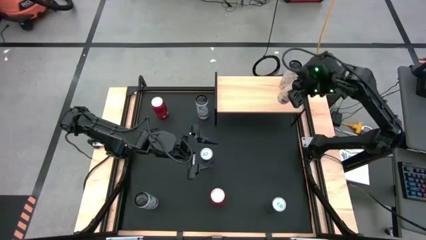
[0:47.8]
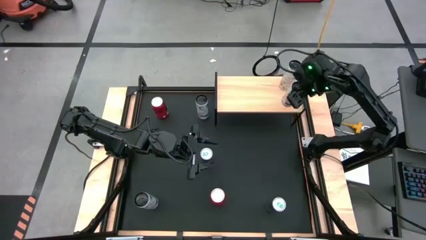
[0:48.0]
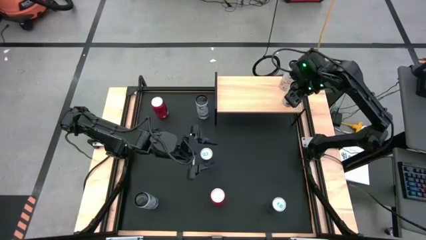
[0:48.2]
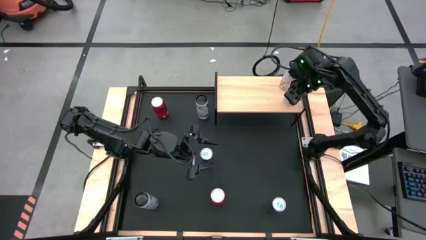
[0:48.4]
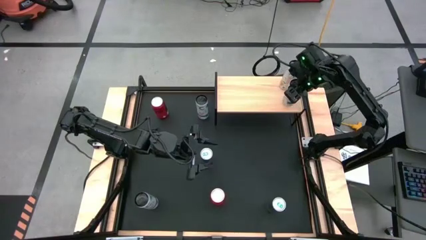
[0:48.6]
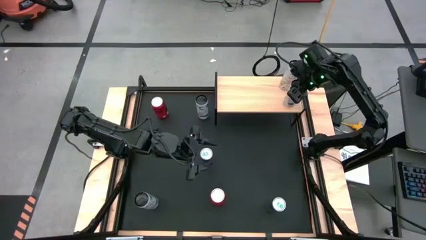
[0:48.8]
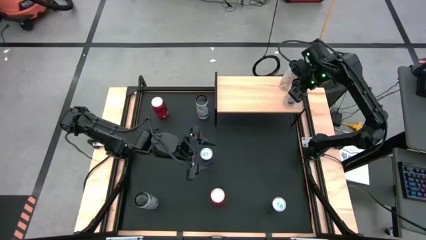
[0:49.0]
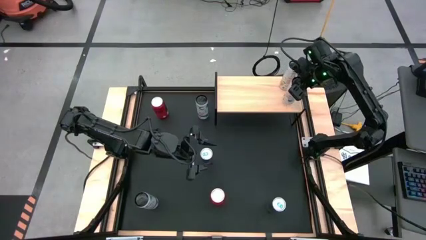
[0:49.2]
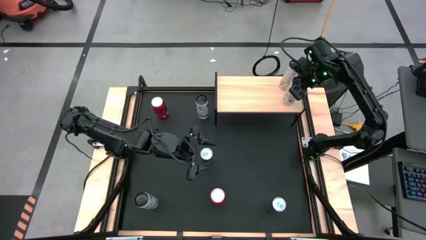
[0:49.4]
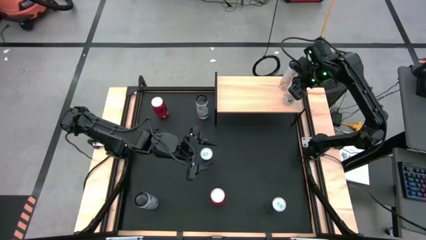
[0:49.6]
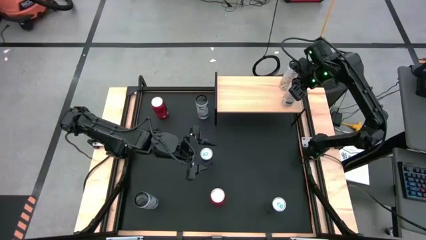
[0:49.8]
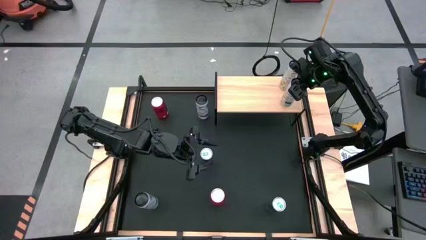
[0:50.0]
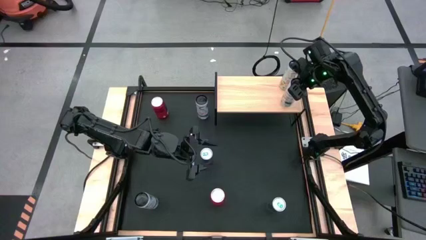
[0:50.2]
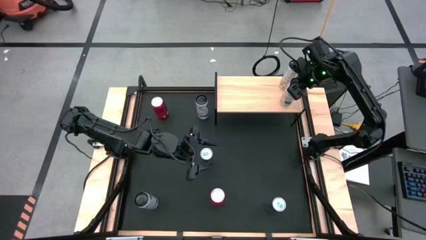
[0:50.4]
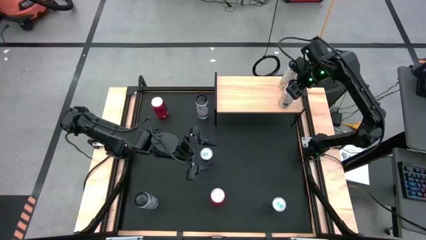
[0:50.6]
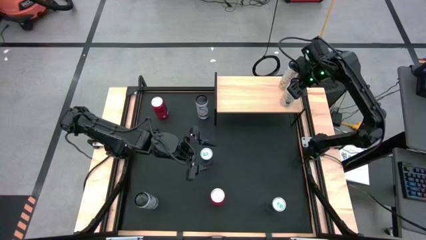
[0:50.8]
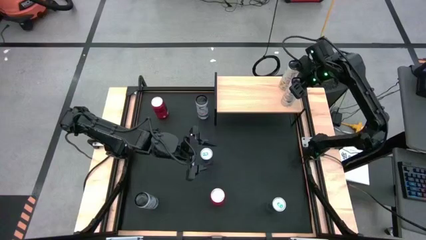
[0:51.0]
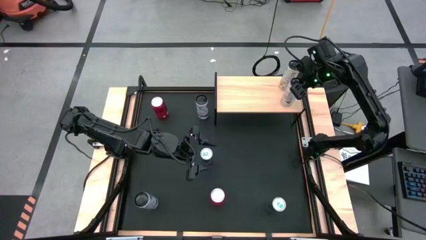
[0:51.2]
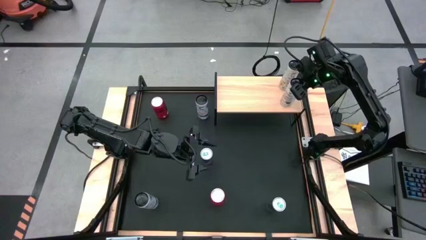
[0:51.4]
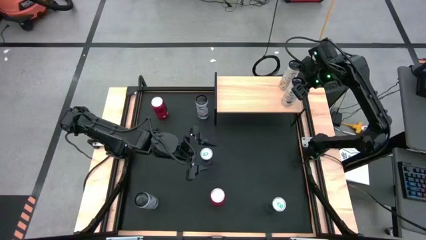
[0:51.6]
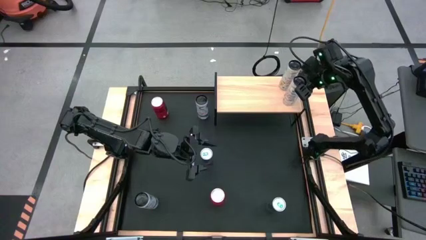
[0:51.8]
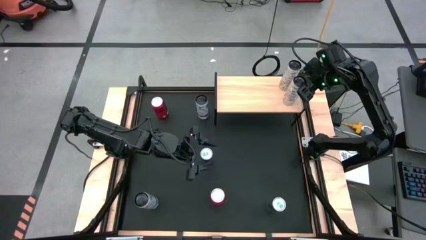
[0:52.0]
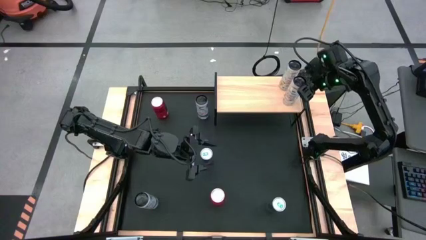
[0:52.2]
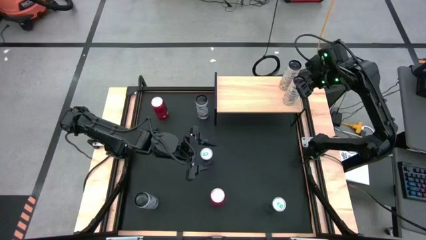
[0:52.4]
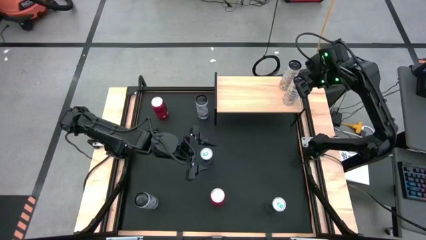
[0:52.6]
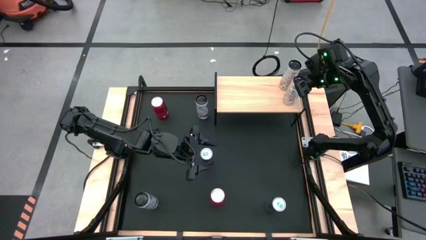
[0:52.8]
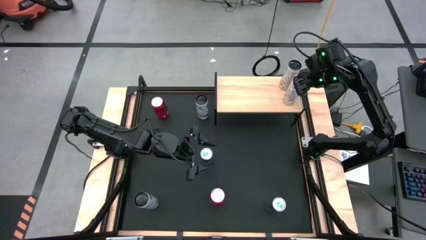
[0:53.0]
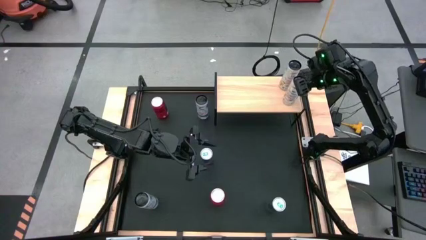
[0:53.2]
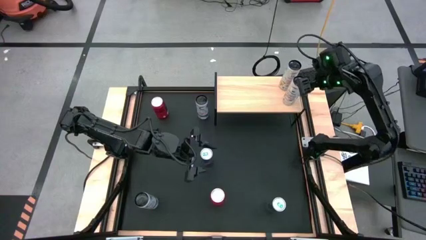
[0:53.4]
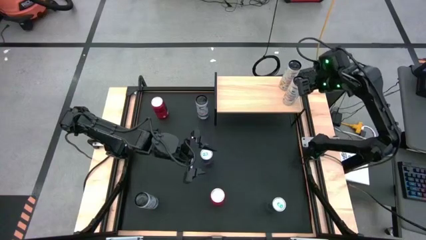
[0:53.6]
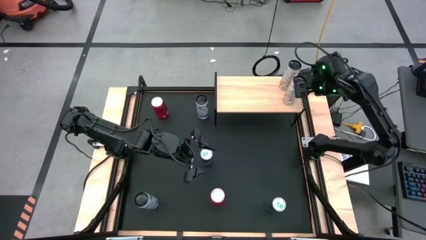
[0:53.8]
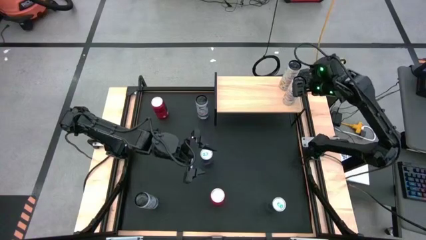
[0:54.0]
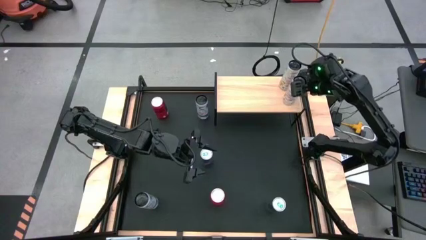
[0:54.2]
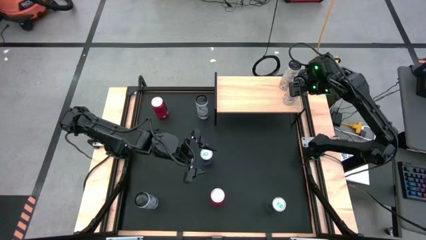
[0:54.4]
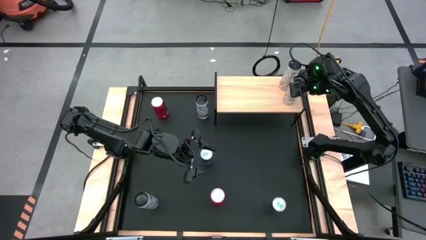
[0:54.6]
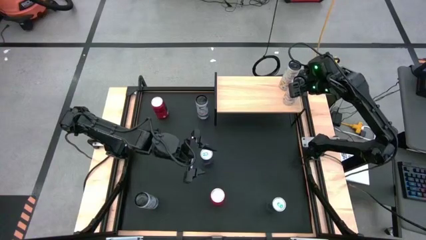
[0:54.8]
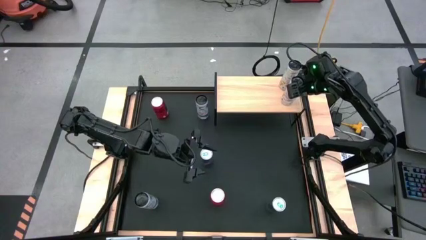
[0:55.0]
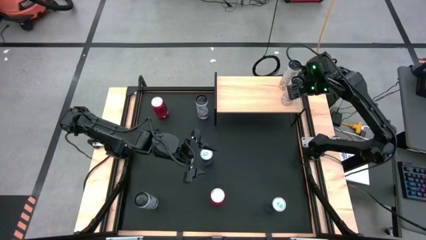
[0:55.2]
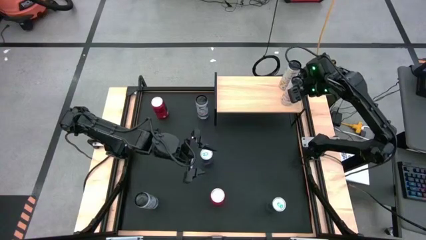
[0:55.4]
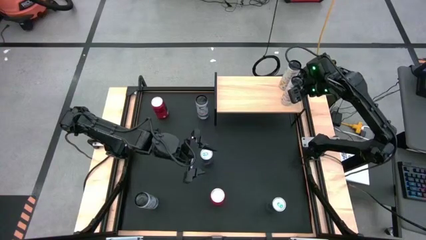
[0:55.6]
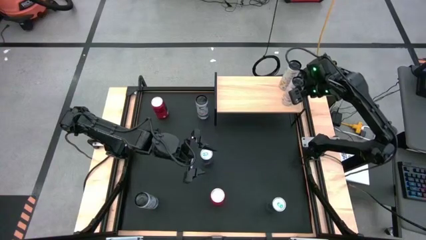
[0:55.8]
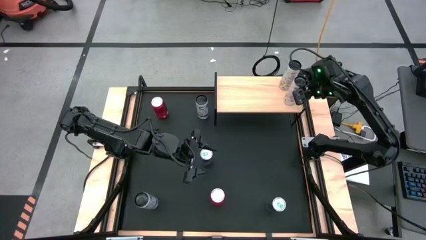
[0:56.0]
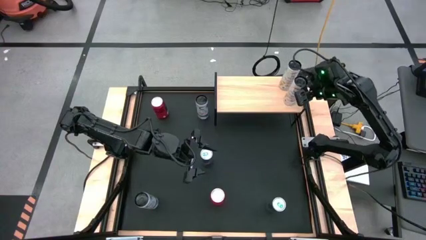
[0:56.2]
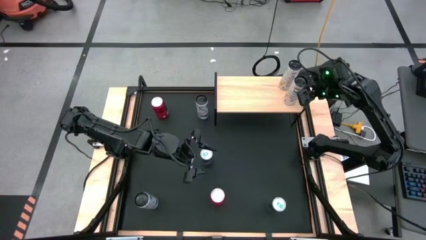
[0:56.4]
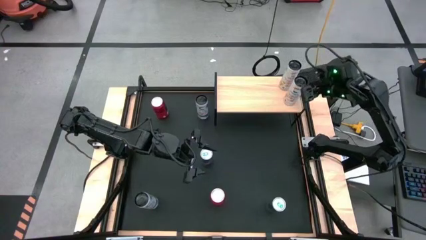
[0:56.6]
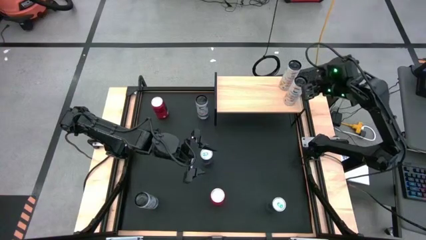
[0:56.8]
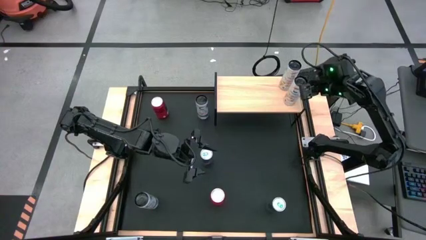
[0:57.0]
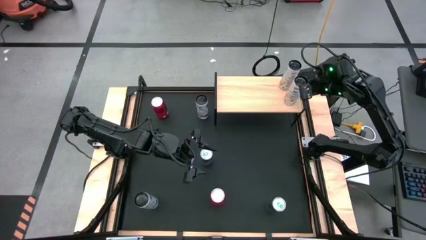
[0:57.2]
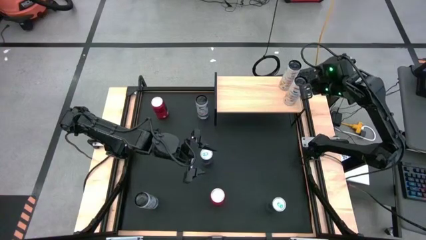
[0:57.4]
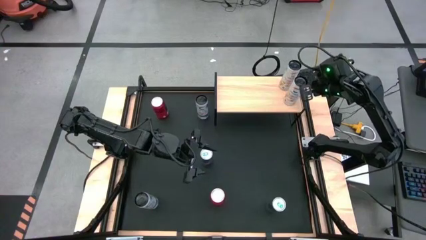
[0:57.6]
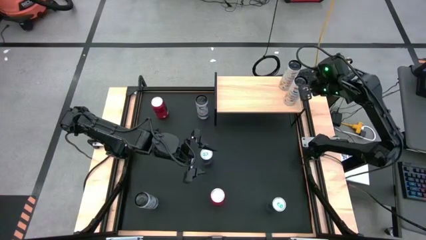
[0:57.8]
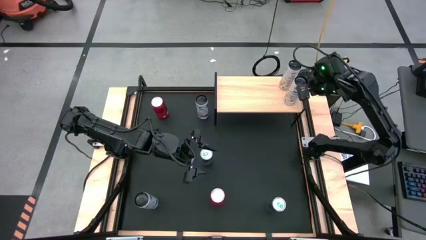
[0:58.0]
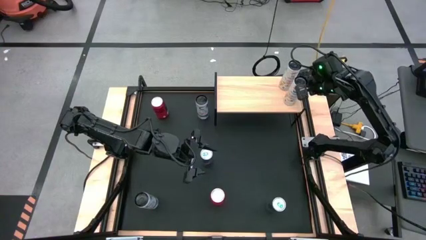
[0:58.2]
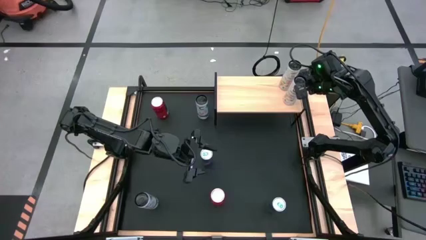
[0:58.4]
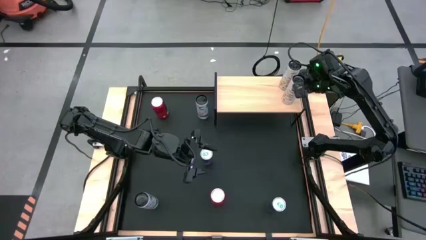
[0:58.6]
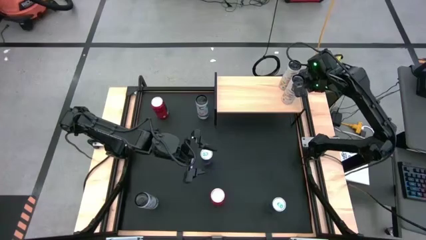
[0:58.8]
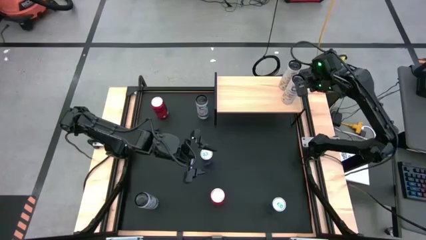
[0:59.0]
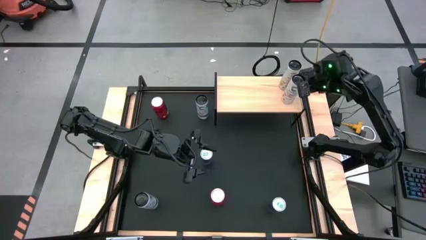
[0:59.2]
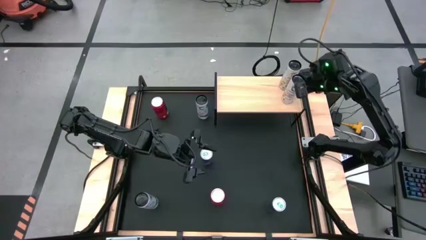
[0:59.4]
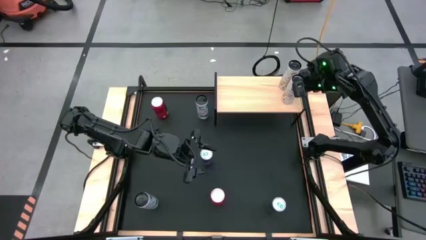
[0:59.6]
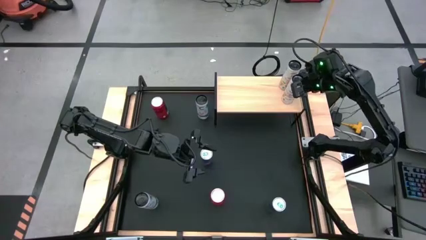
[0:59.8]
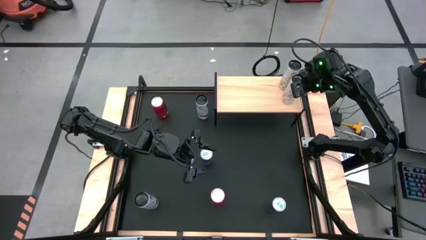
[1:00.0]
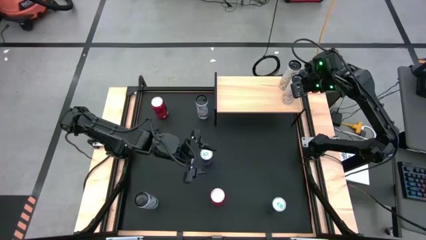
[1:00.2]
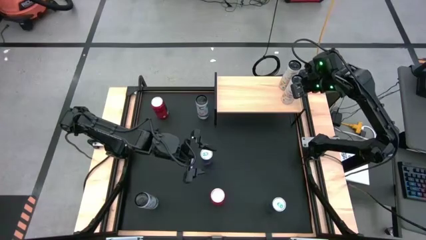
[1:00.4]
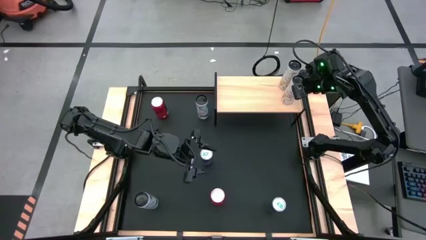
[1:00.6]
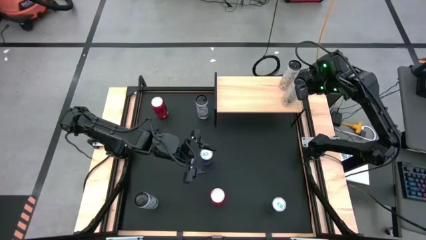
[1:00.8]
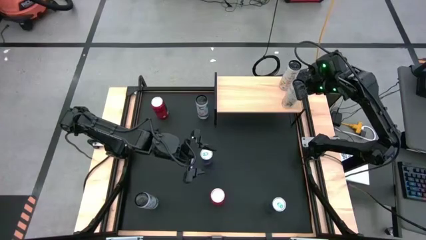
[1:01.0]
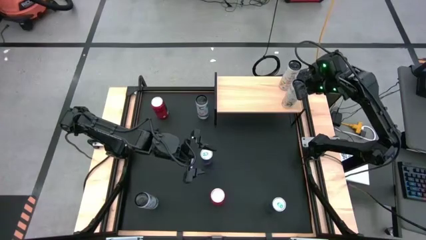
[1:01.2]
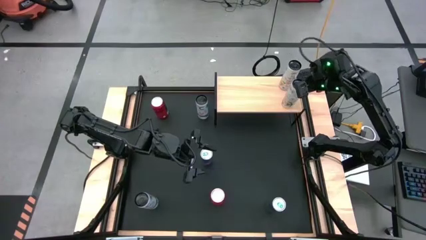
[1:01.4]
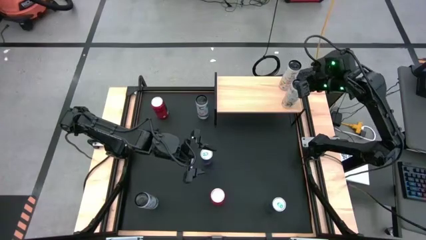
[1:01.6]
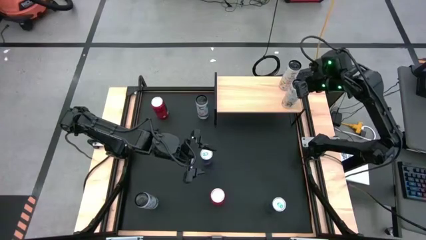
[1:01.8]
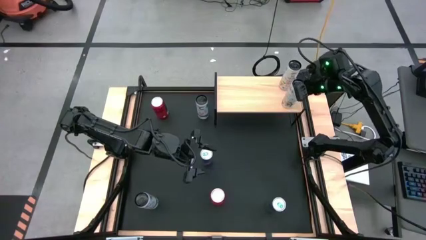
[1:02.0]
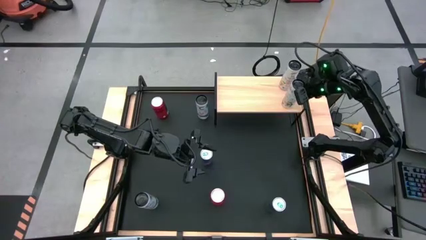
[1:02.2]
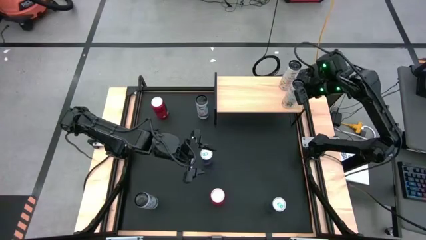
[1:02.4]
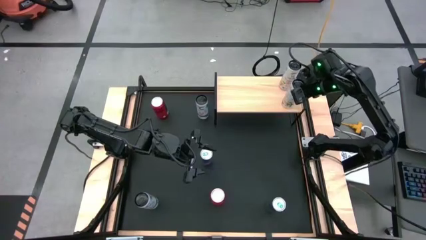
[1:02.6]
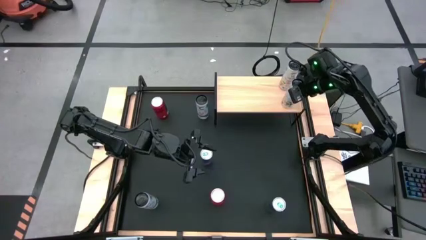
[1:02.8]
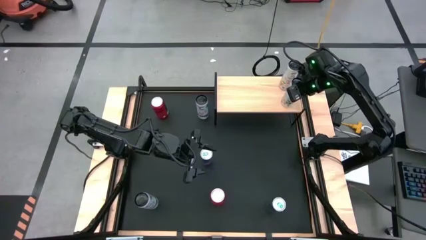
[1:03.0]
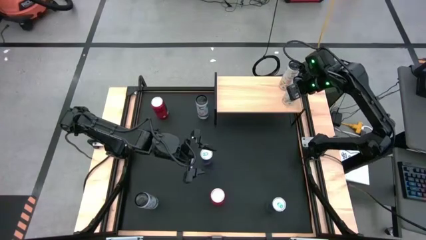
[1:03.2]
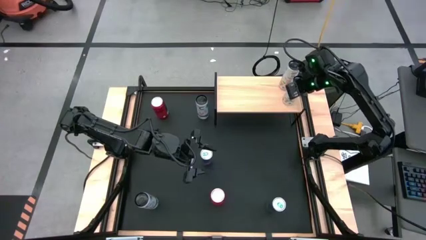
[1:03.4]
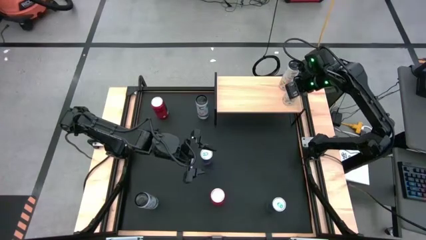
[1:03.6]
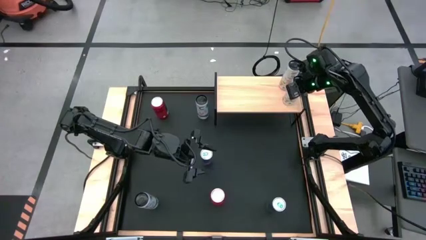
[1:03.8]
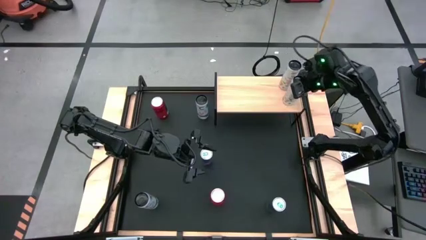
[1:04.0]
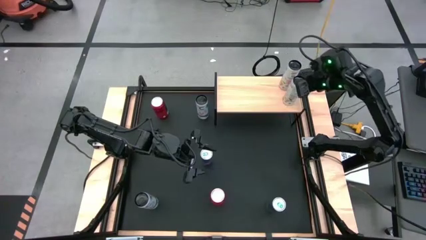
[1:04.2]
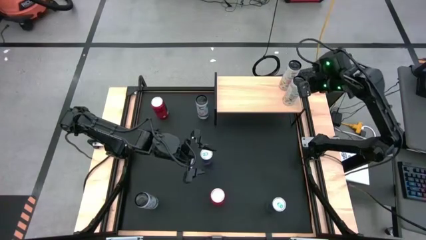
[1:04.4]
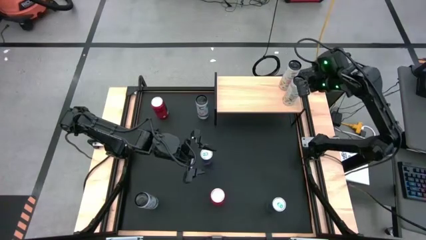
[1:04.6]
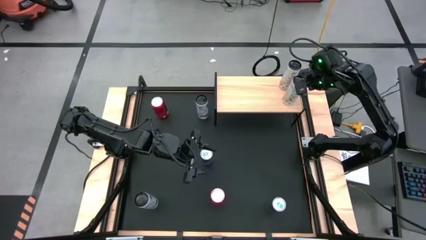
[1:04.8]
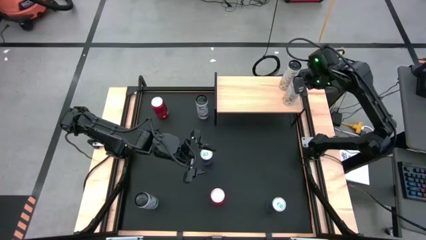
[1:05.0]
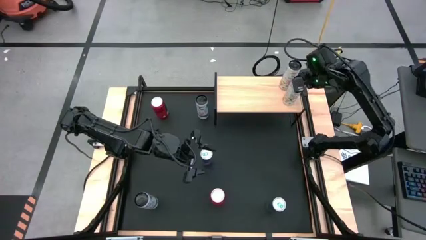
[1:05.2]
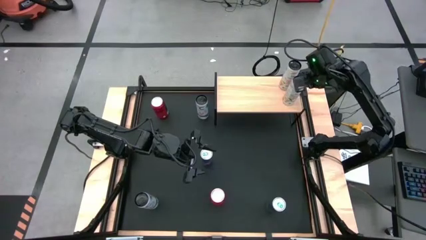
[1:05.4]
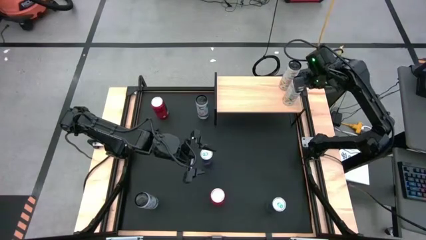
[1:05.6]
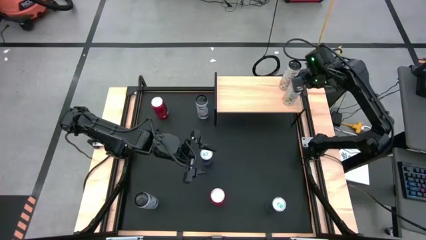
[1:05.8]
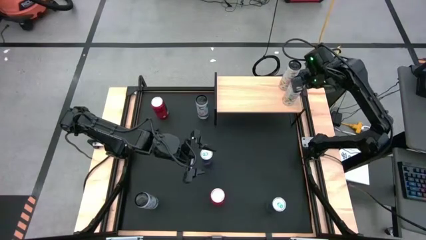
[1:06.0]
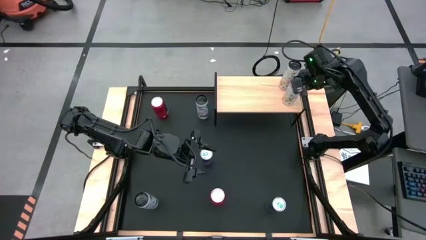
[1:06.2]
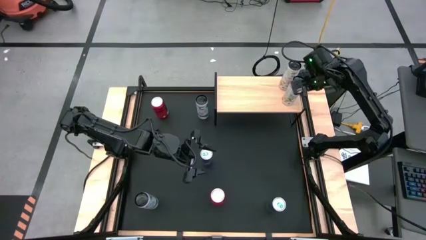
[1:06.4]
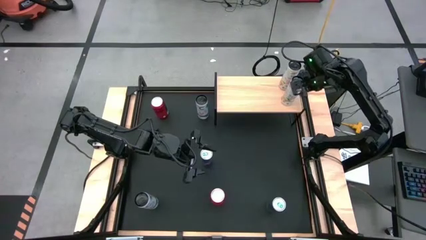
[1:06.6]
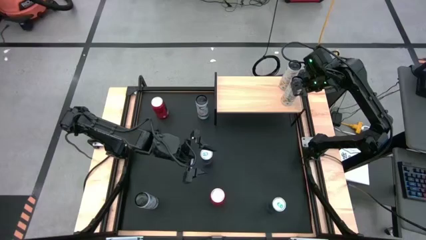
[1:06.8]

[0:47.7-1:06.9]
Task: Place canned beverage on shelf
Put the white-yellow soda can on the shelf aligned with the other white-yellow soda can
